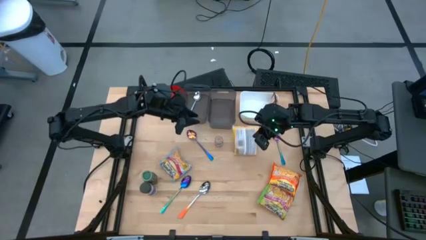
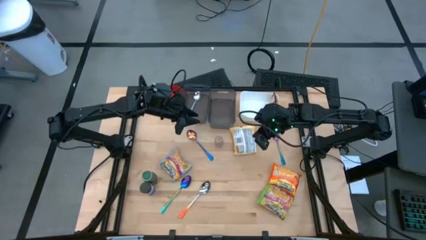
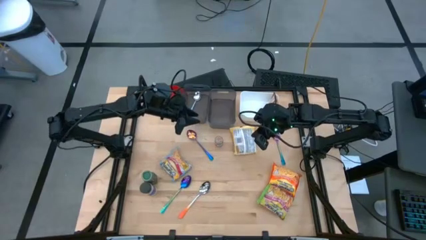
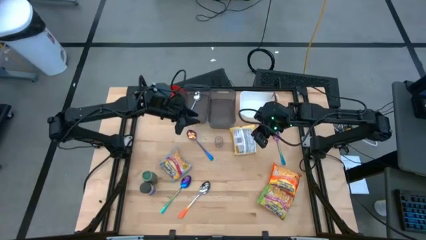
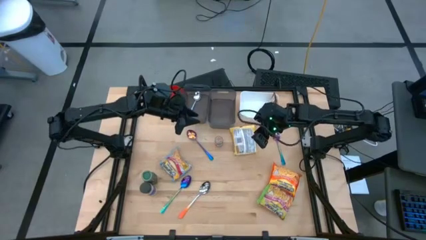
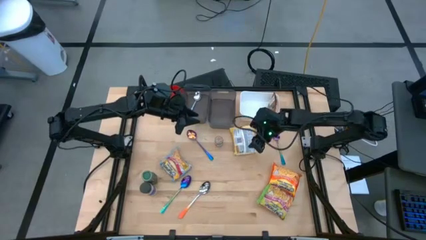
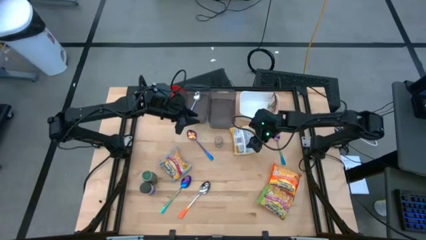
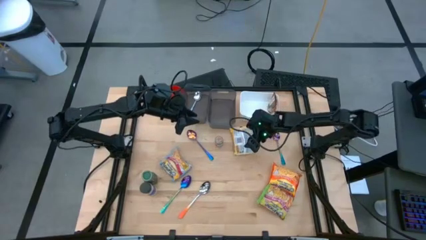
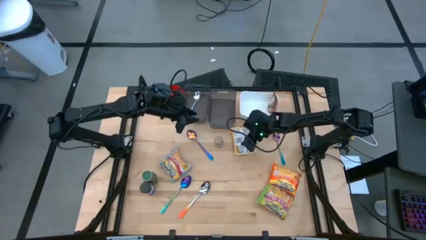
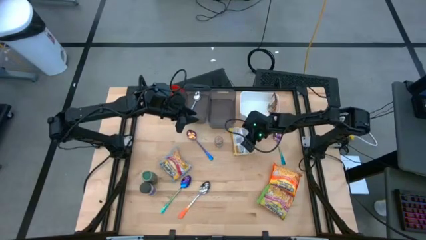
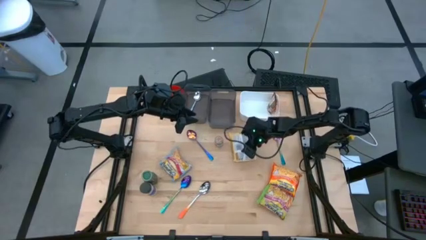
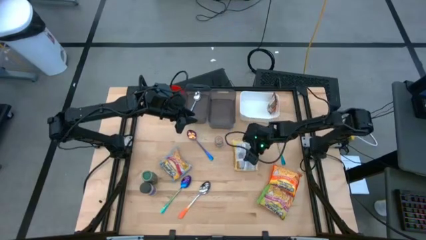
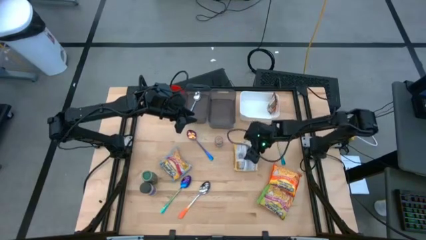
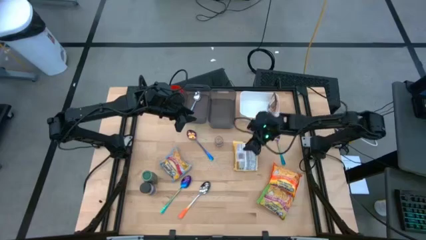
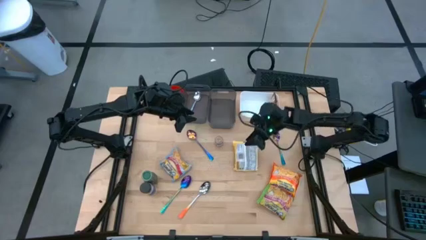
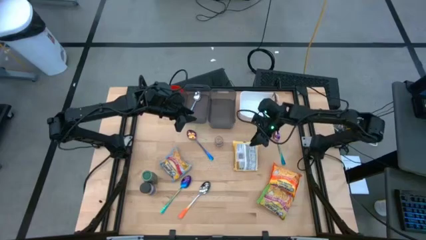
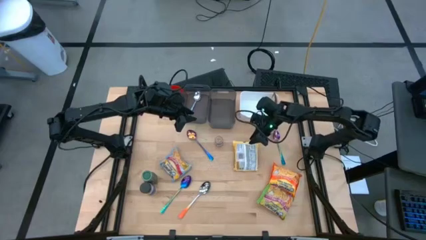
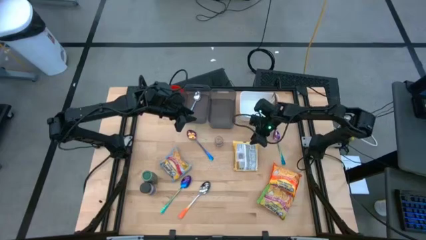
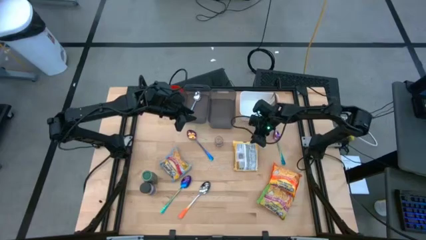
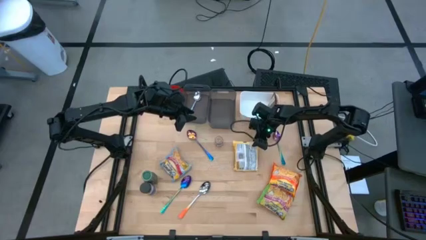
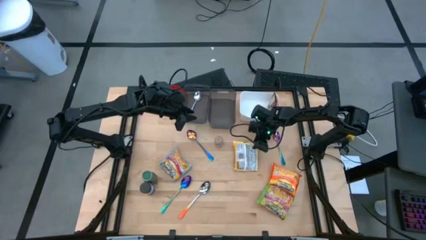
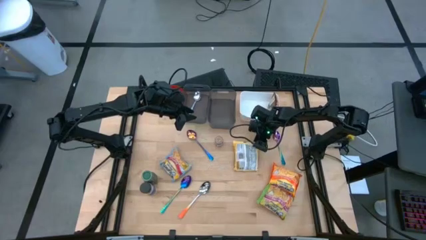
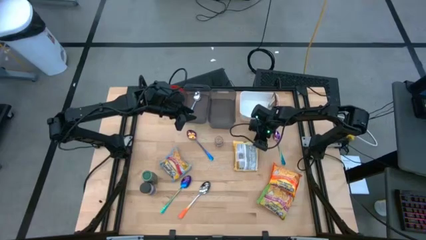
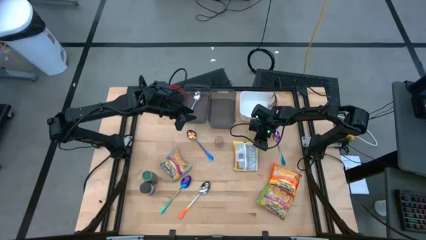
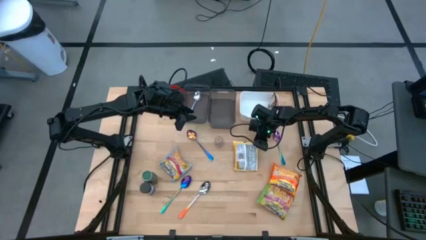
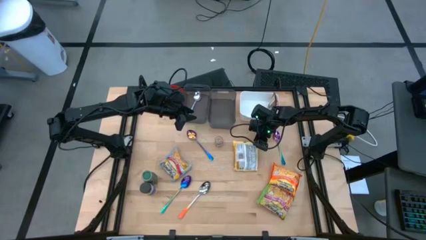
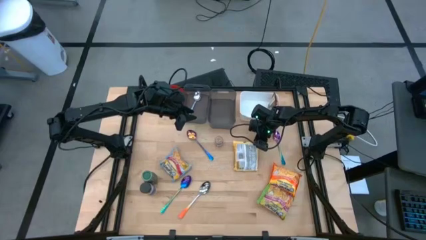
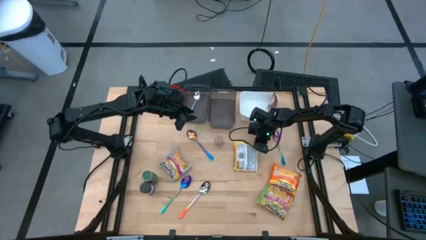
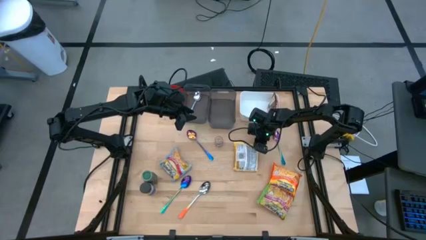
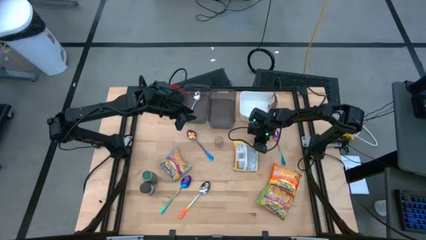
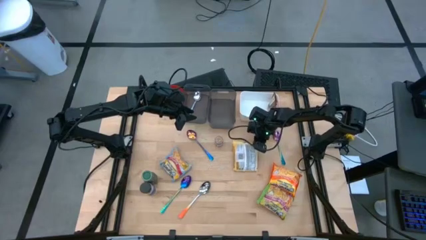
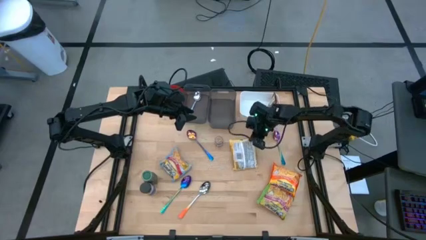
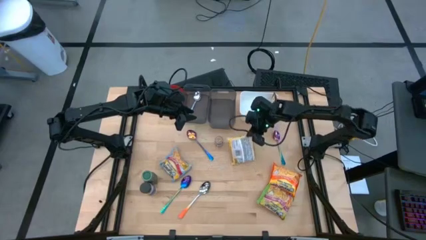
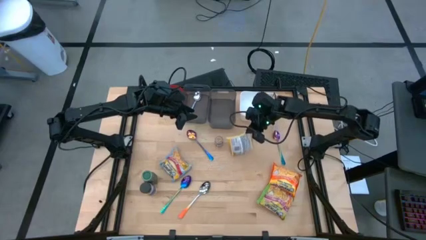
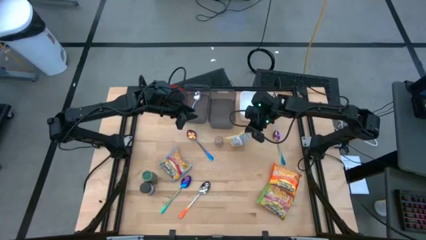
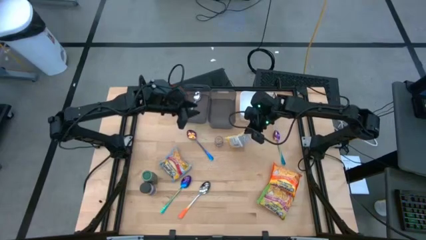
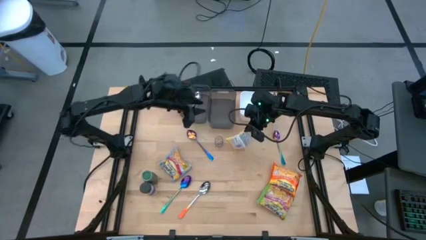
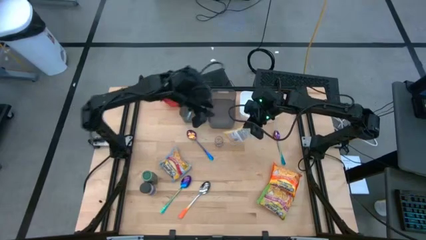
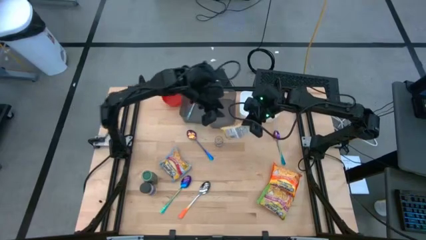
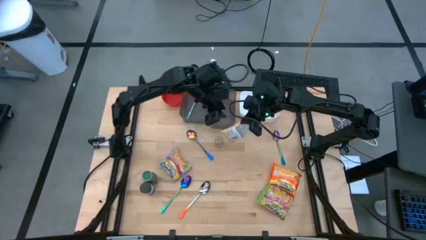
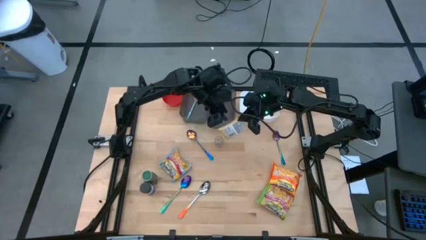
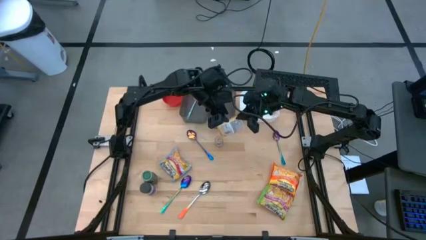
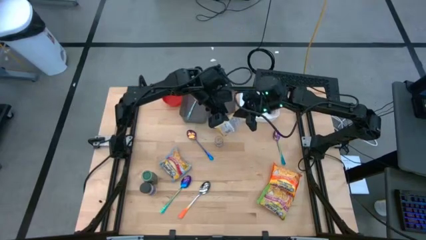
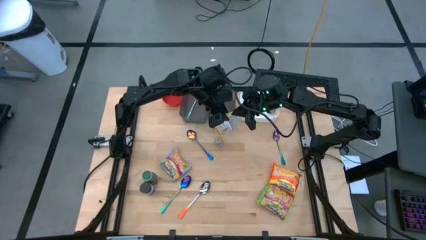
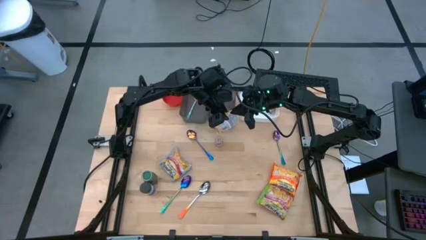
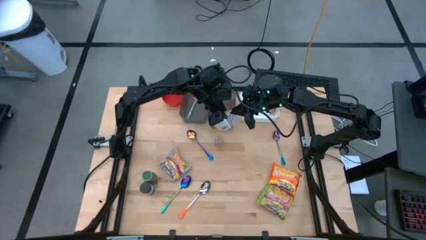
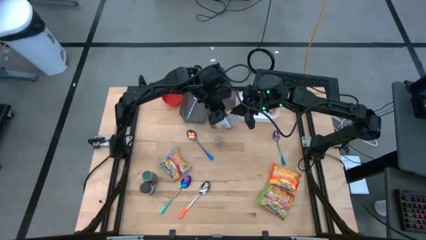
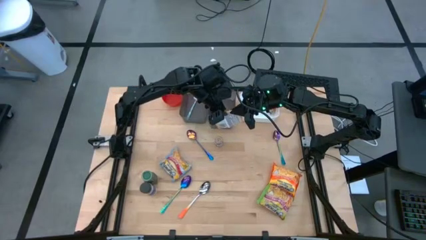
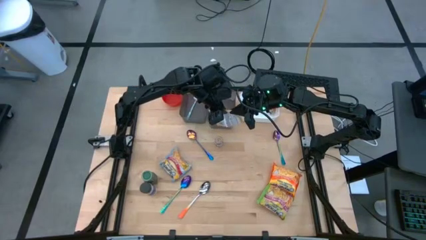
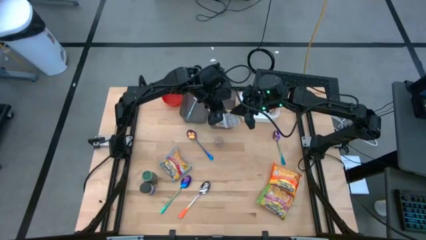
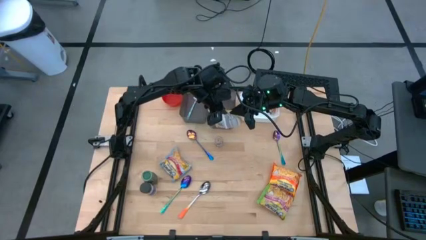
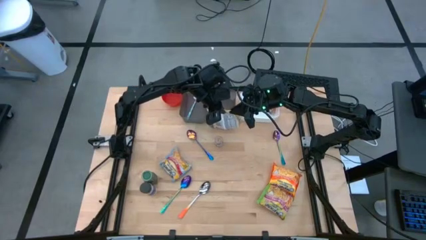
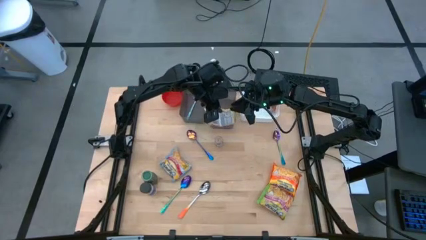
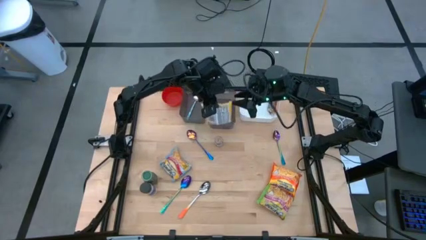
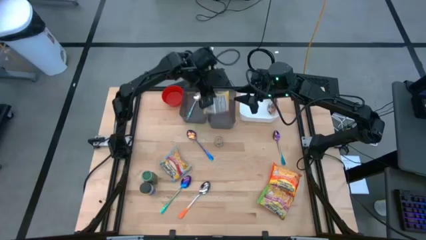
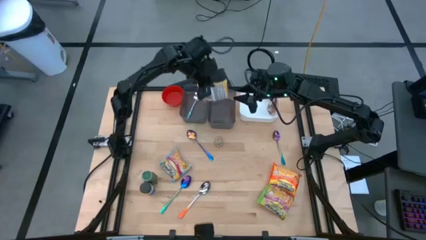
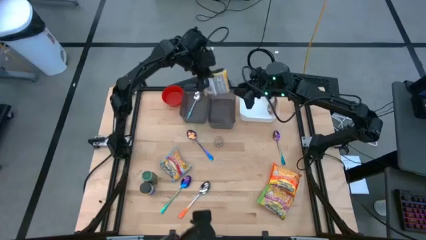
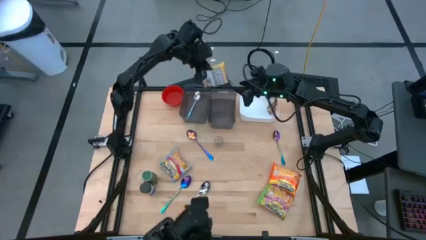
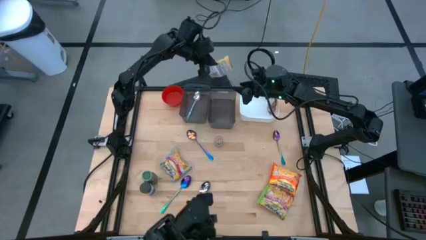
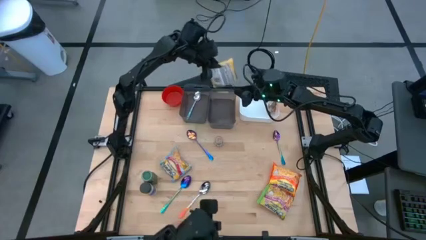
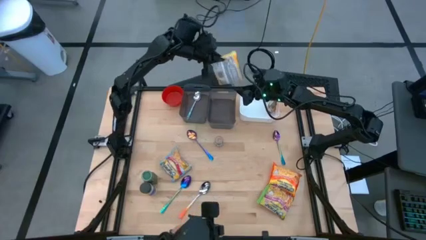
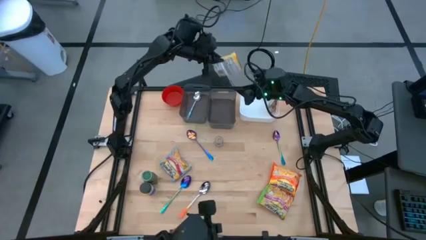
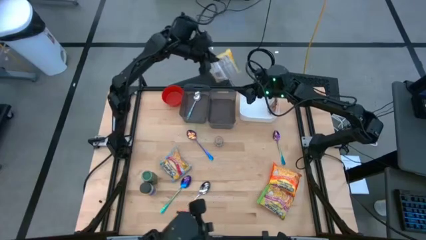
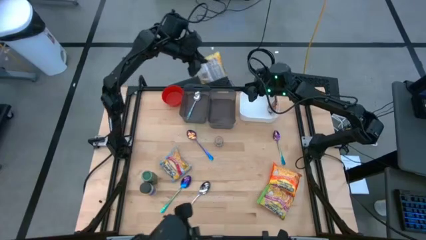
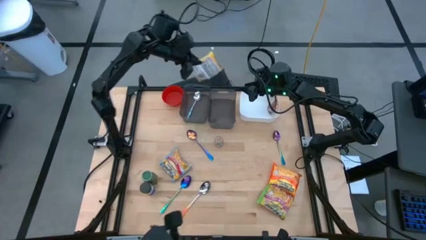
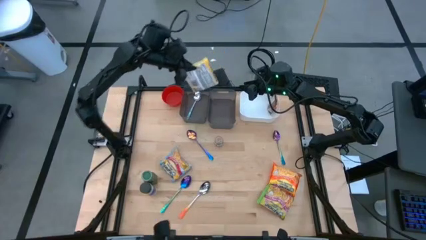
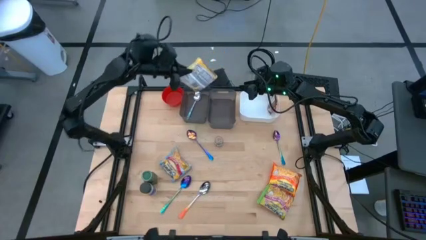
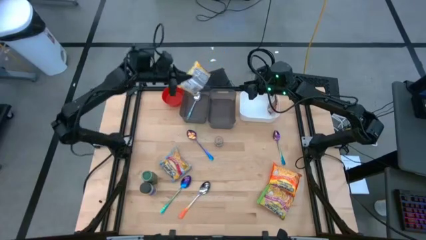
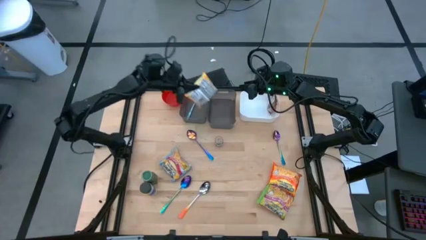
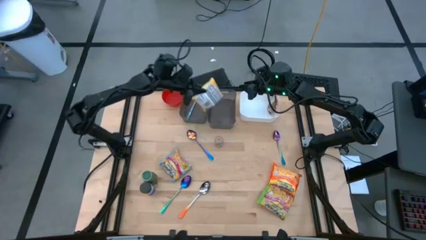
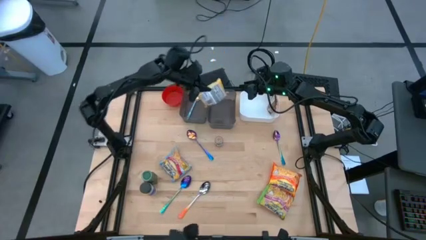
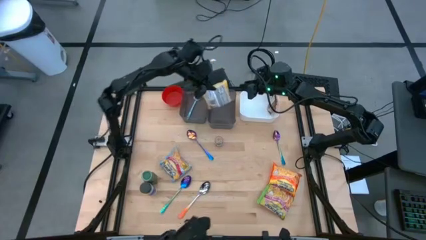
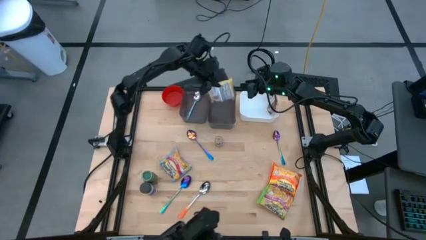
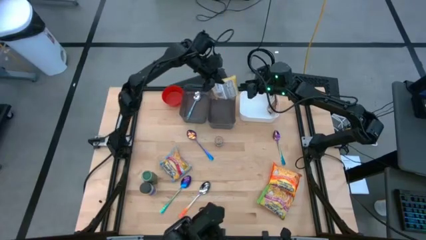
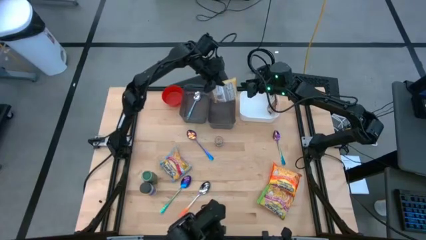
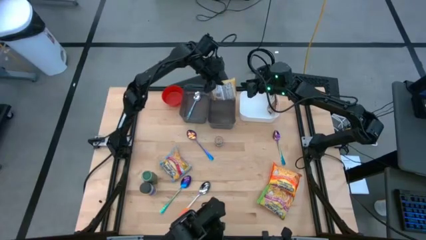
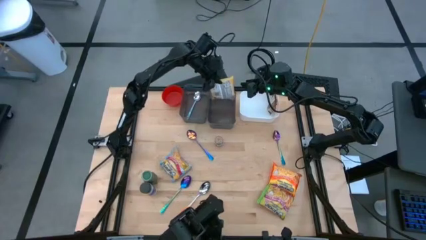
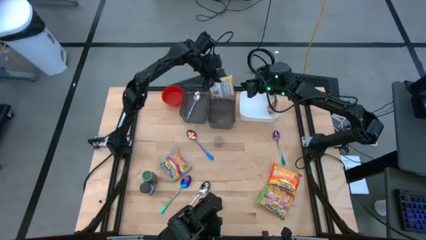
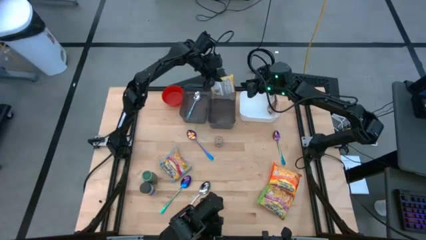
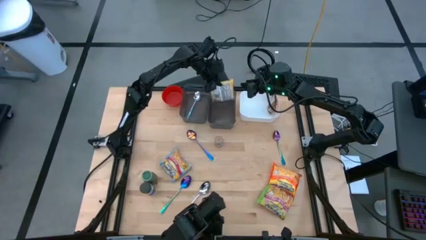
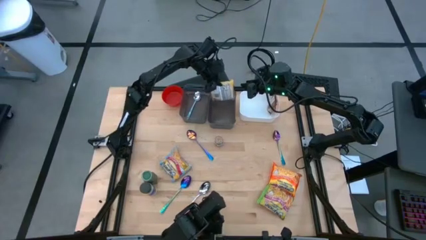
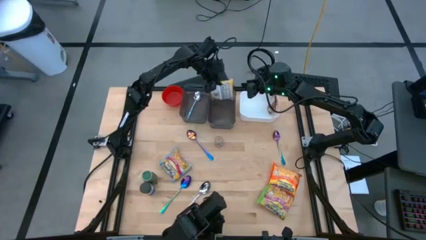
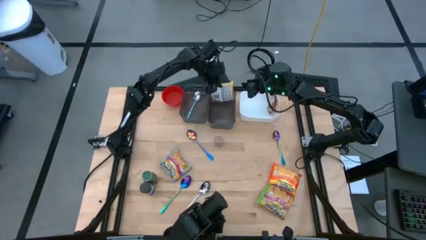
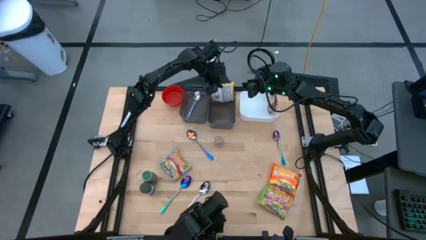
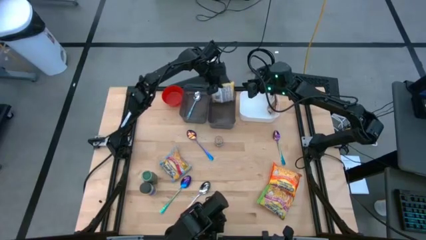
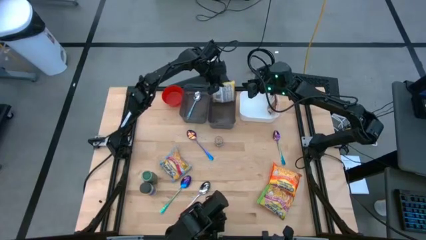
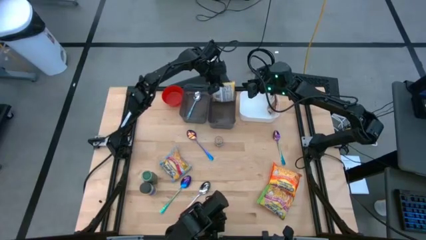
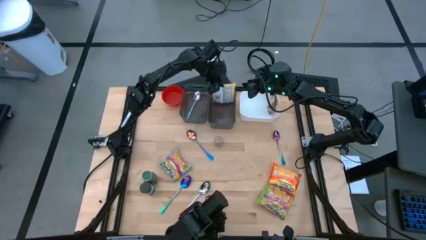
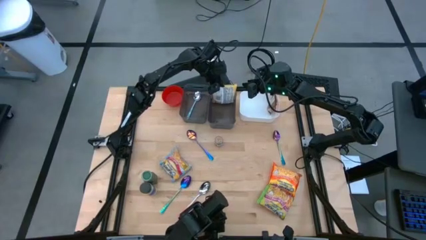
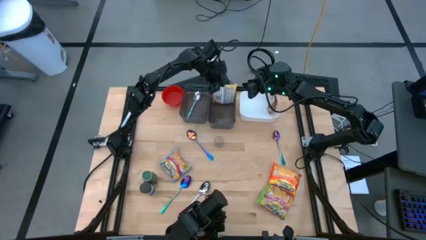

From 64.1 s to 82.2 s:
Task: Pick & Place Food Item
Put the yellow noodle pack into the right black bin
